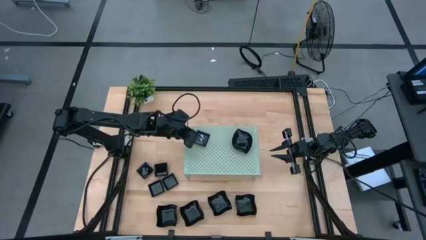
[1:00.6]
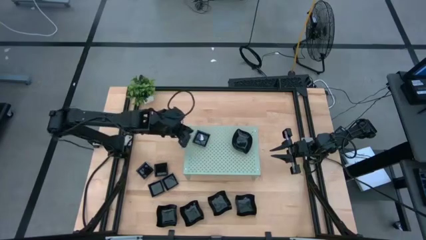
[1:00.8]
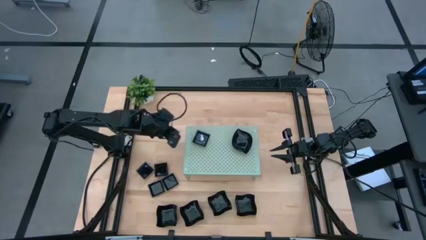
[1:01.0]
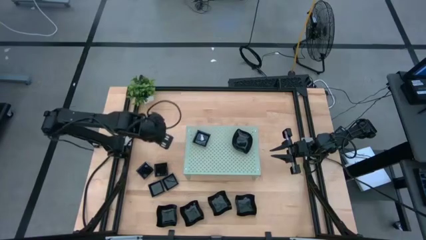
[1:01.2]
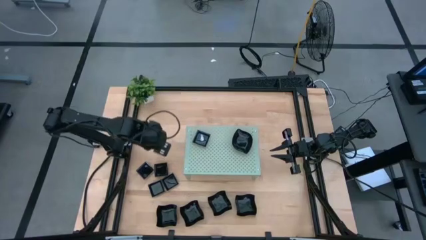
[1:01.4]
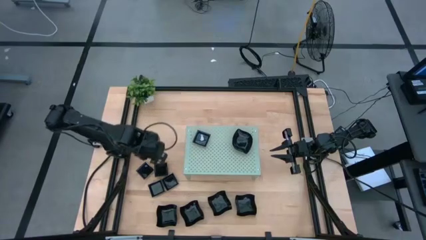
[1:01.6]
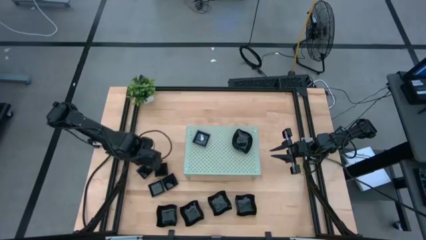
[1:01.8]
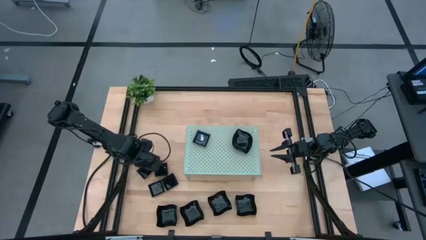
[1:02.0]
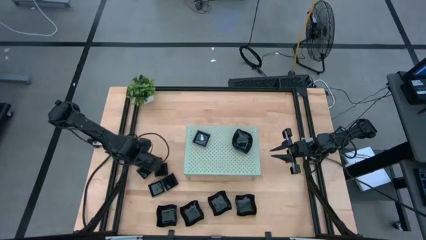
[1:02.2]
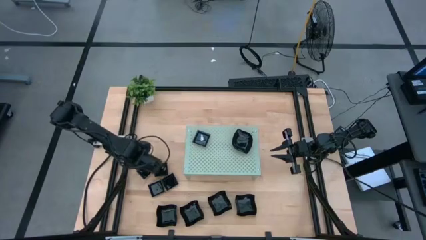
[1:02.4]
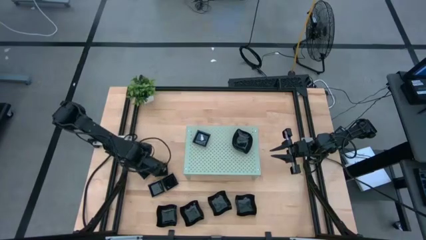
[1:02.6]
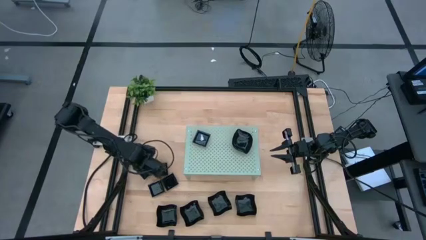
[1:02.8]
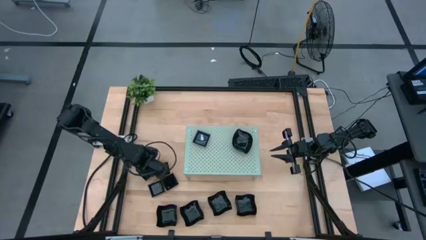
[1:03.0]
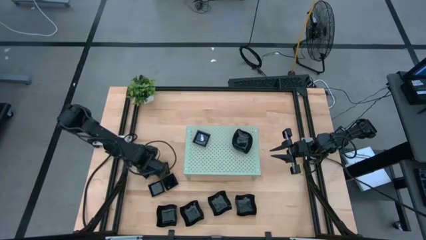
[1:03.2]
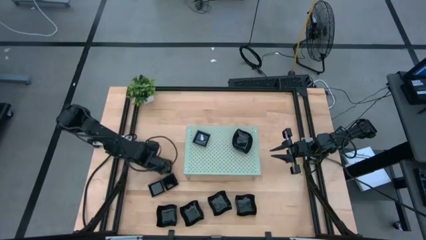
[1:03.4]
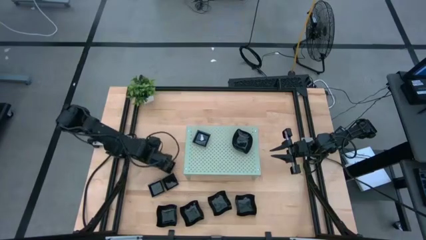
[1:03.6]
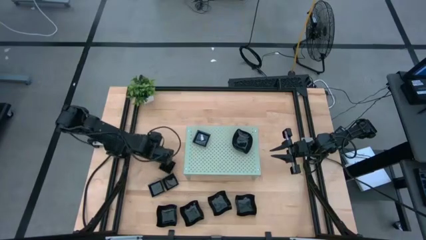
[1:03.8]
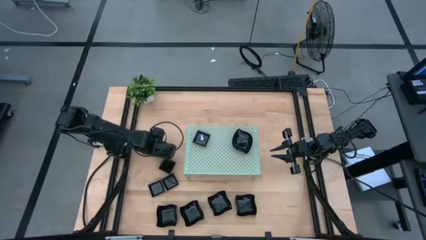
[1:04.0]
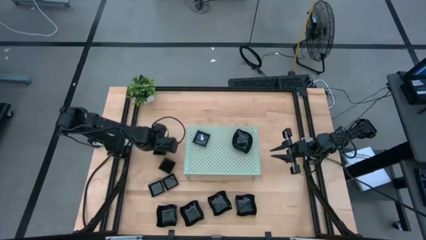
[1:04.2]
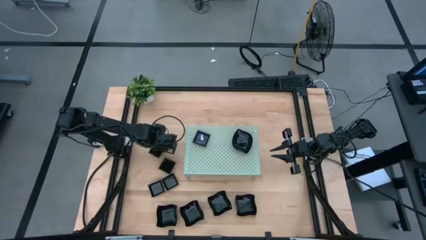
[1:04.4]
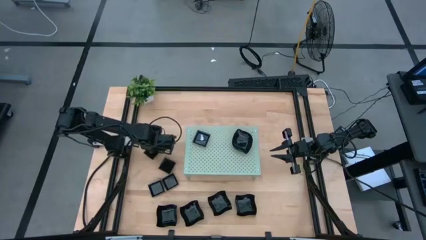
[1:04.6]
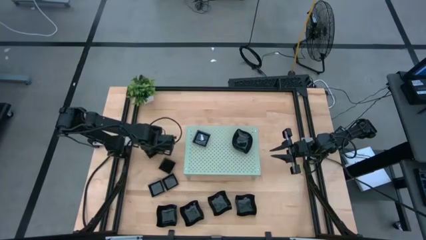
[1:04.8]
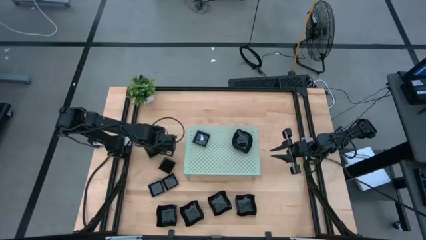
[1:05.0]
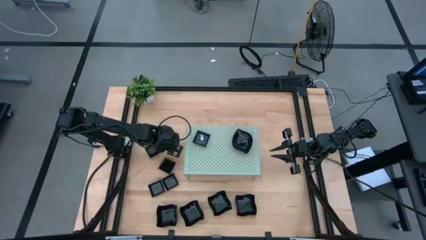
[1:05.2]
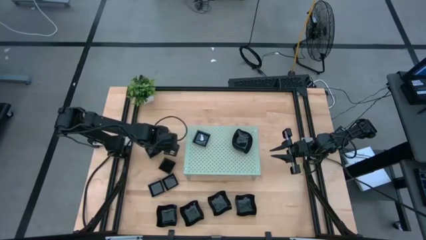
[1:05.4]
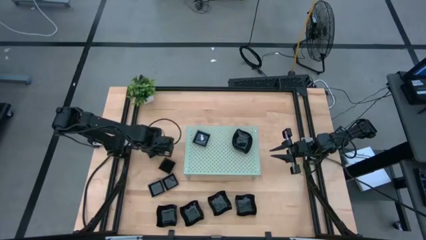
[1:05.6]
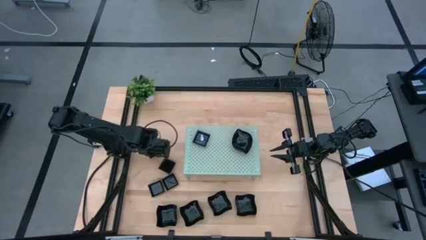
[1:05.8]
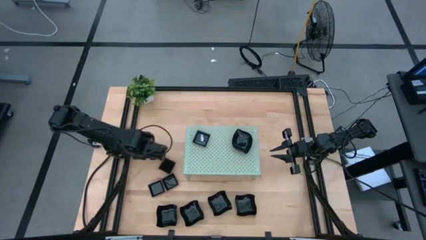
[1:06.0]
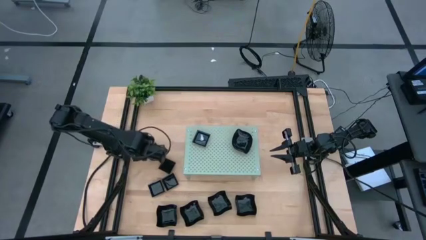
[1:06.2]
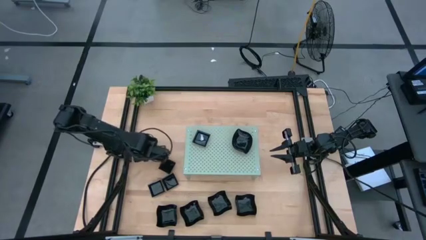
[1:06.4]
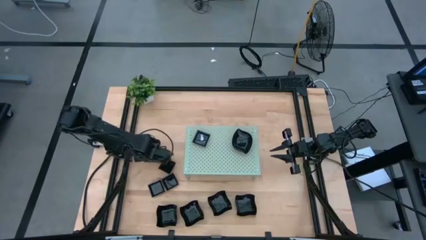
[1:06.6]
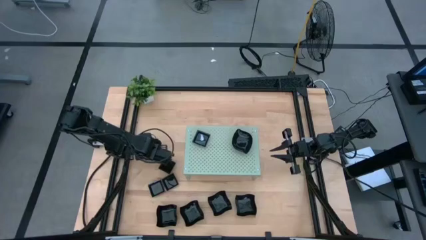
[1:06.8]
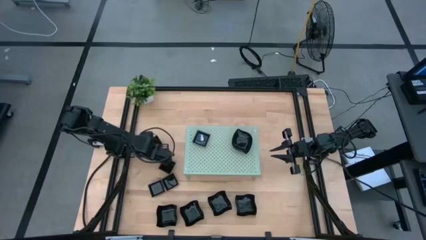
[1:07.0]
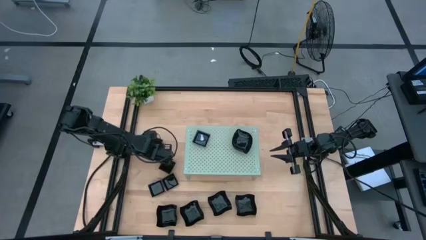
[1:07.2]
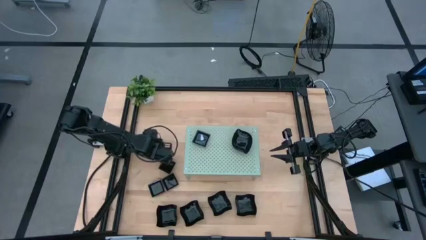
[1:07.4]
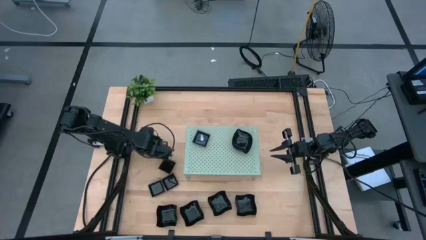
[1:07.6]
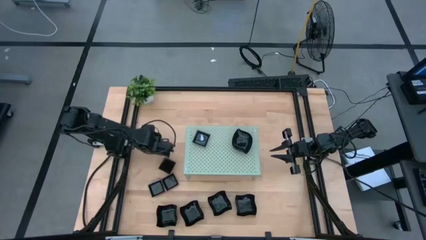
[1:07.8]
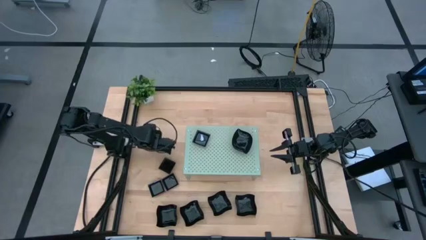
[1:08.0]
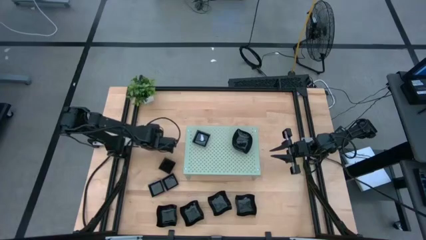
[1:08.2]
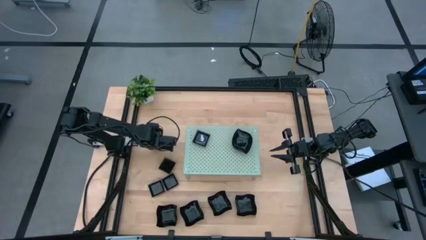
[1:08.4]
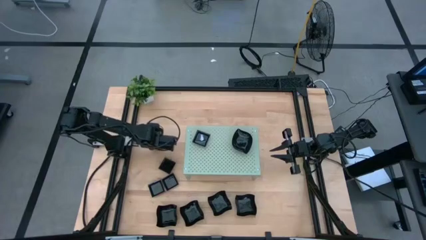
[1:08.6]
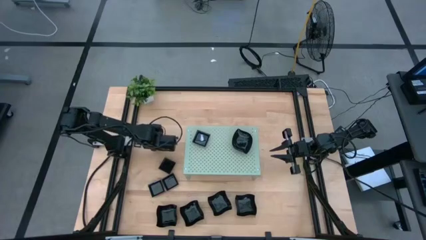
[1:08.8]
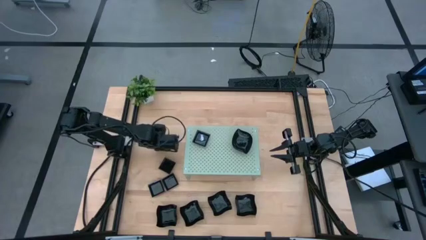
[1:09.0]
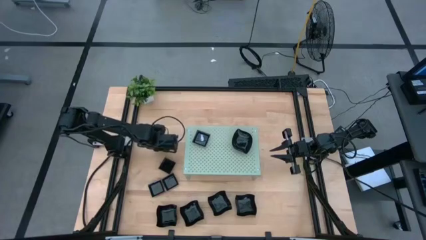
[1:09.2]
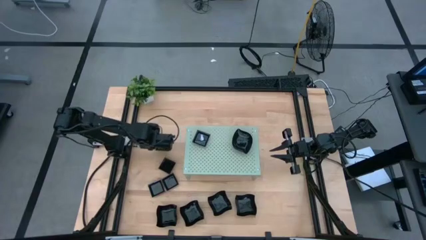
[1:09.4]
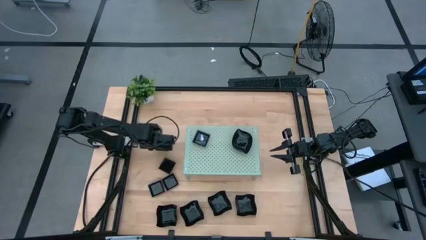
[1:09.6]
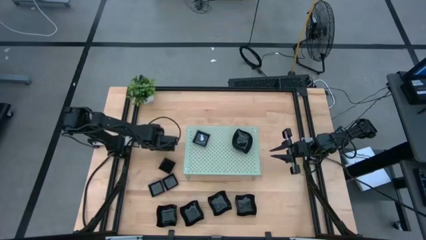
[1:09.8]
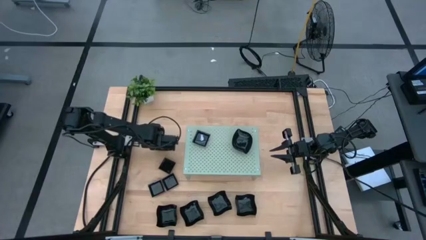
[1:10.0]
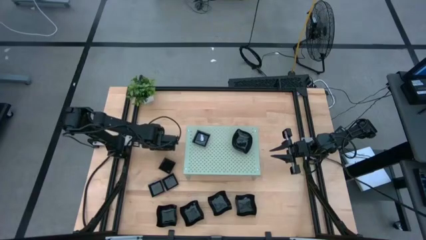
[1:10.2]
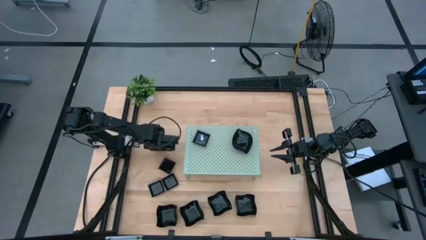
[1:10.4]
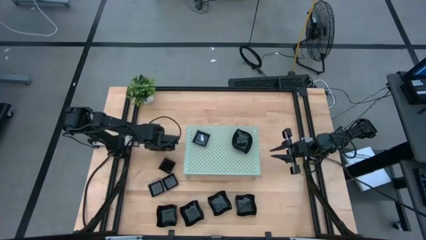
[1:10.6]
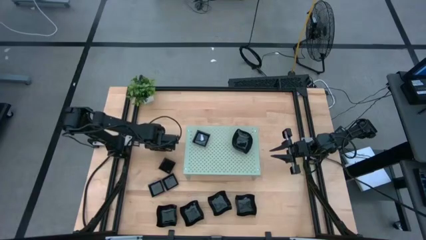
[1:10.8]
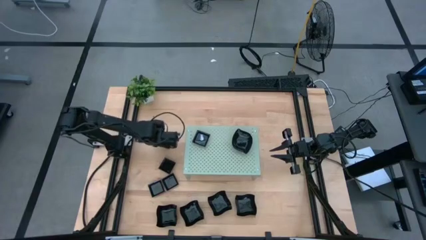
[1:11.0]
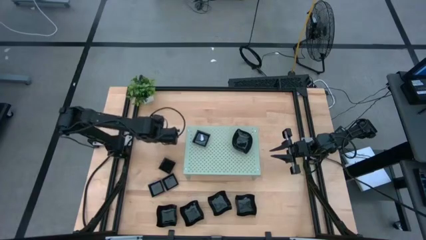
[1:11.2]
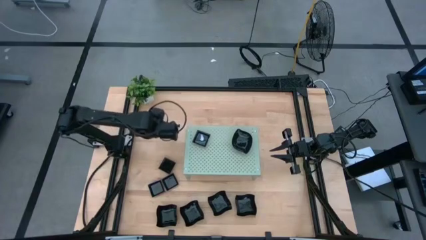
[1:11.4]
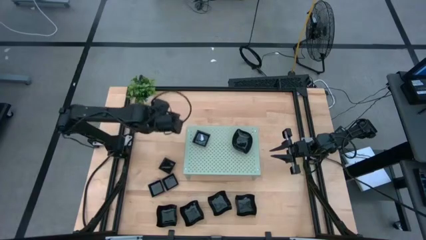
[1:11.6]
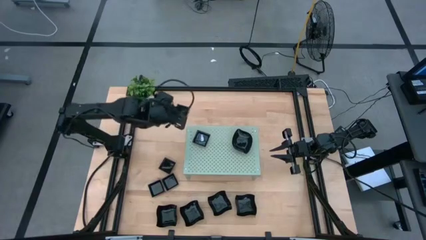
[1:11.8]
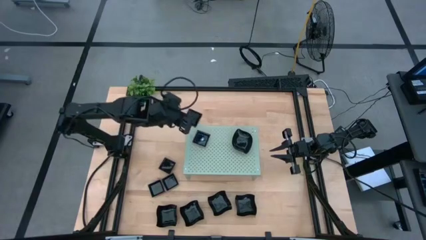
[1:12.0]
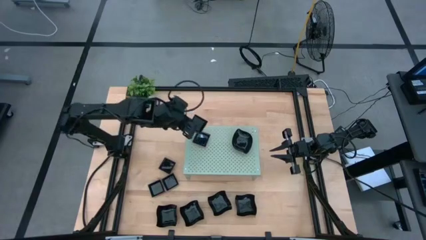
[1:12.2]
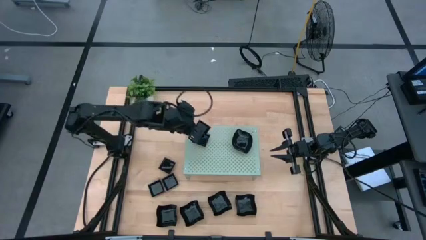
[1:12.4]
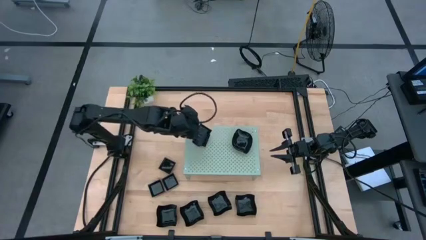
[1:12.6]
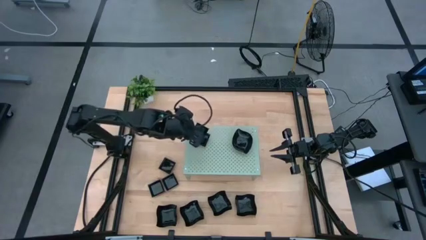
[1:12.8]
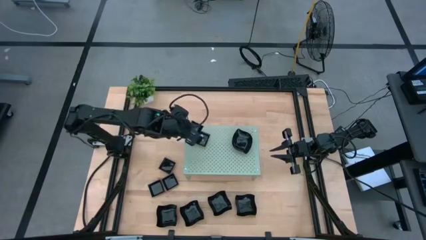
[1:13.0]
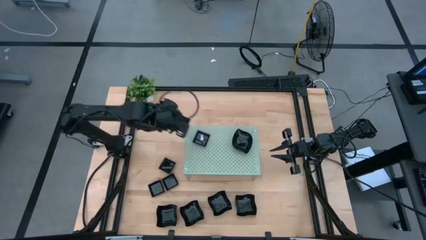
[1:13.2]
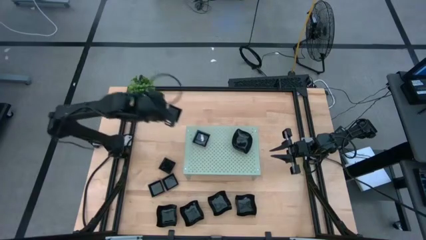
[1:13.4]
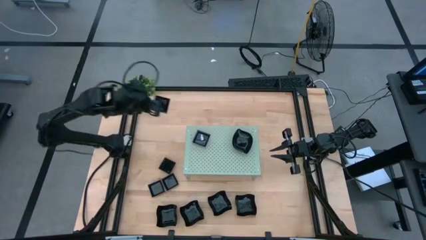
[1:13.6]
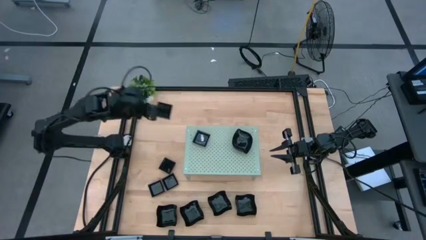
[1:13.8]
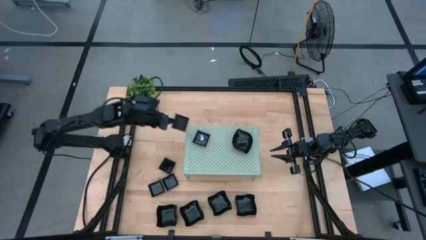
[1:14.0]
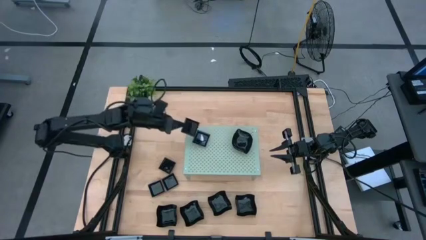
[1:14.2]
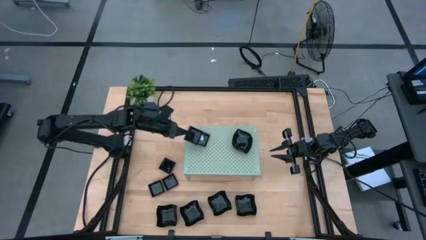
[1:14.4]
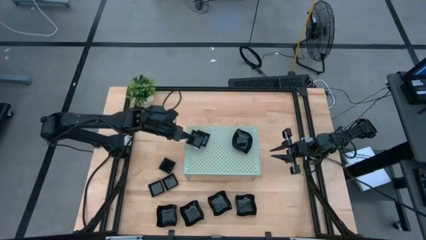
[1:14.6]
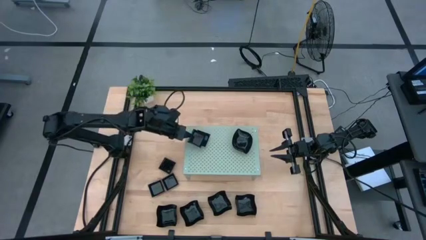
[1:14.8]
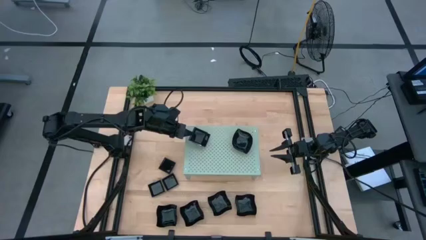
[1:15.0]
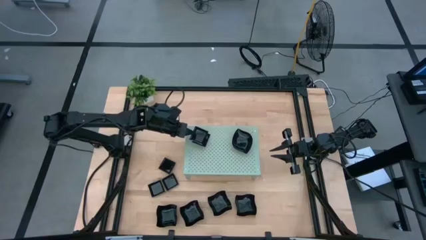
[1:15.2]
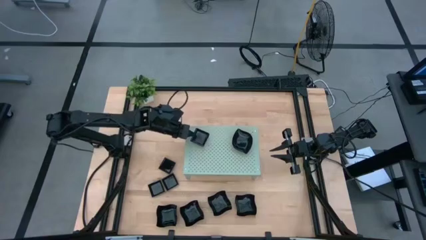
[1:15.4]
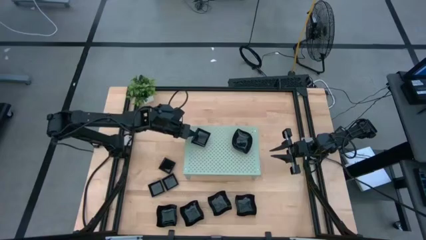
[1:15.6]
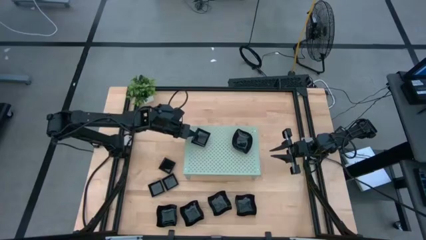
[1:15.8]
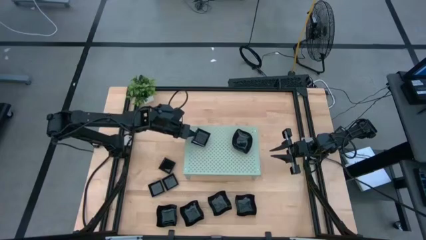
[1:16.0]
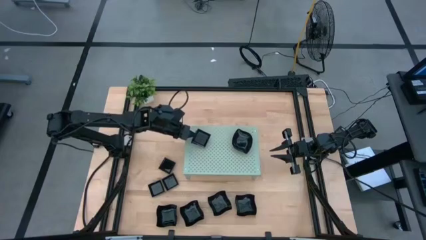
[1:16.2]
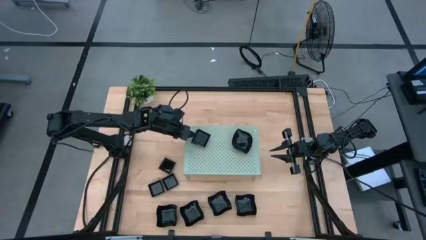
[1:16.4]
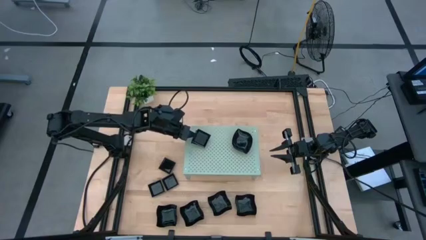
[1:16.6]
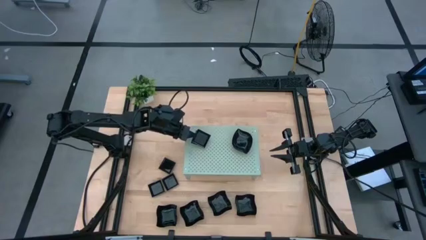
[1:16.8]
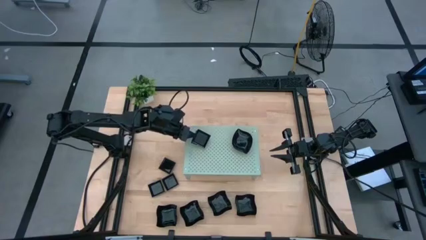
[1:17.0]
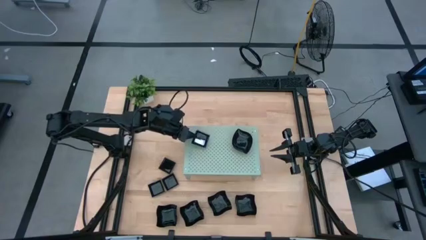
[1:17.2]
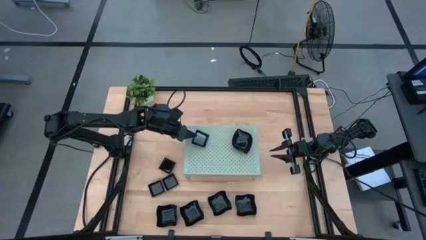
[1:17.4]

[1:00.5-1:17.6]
Task: Pick & Place Mini shaped plates
Stack the square plate on top of the square plate on the shelf
